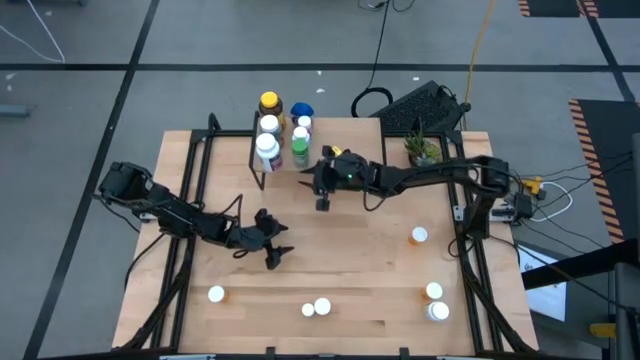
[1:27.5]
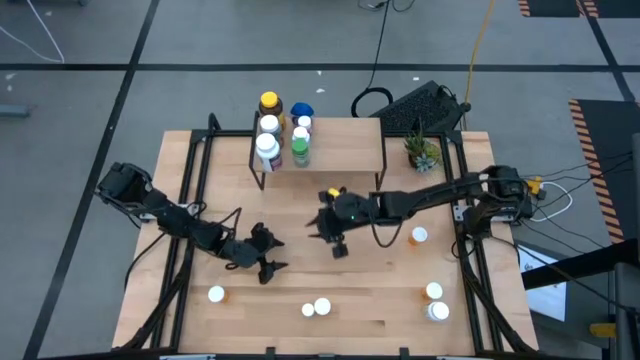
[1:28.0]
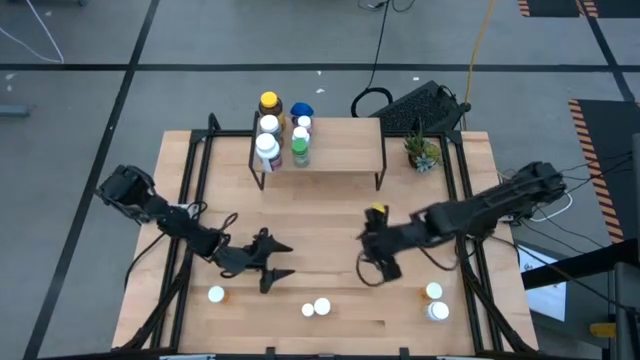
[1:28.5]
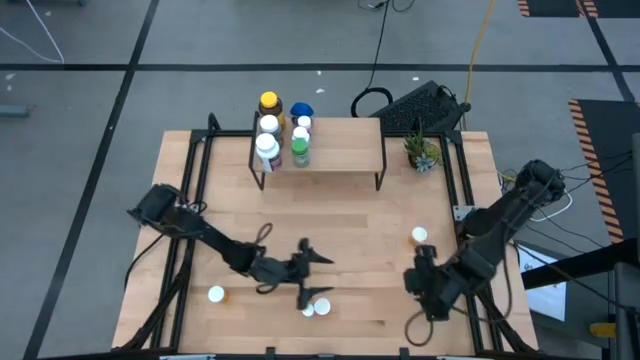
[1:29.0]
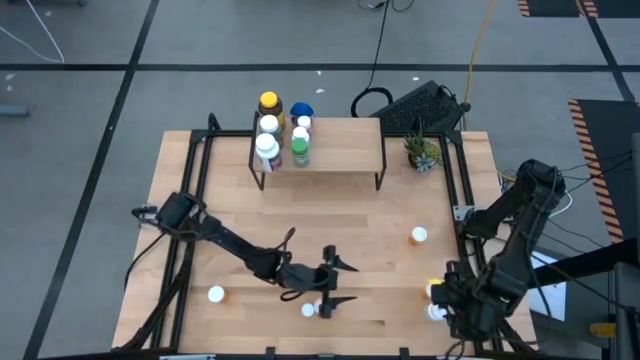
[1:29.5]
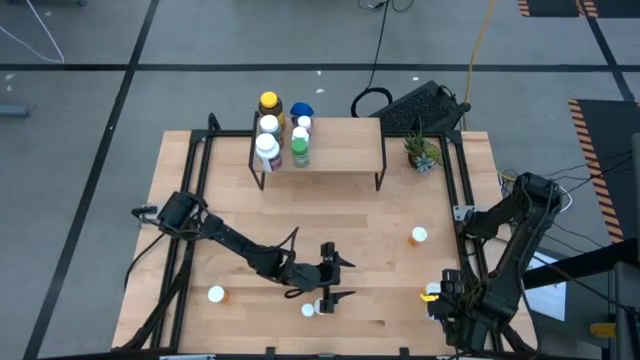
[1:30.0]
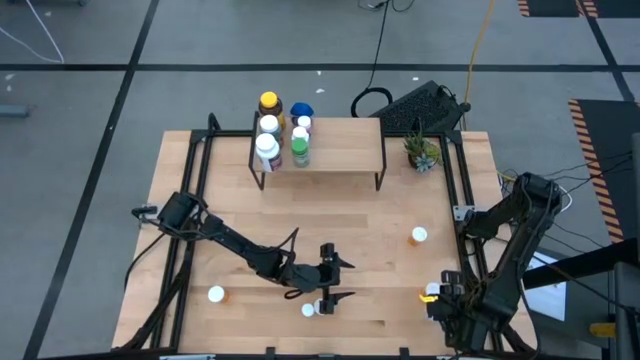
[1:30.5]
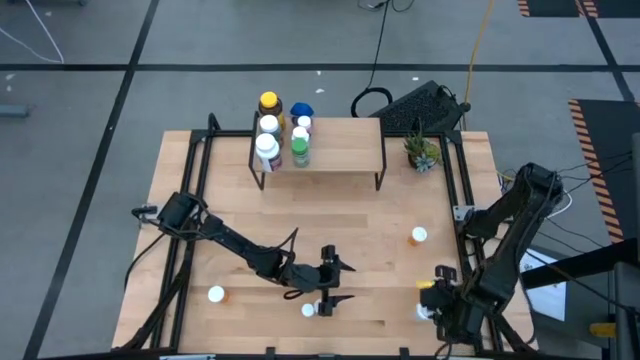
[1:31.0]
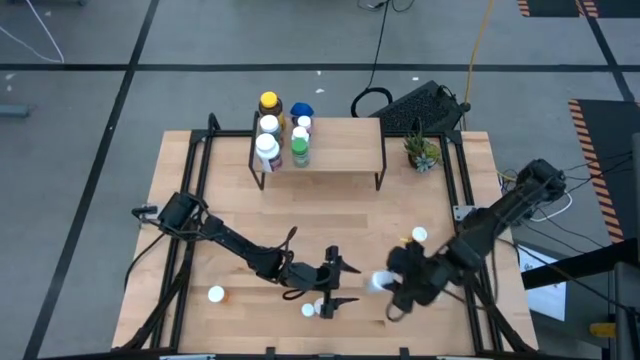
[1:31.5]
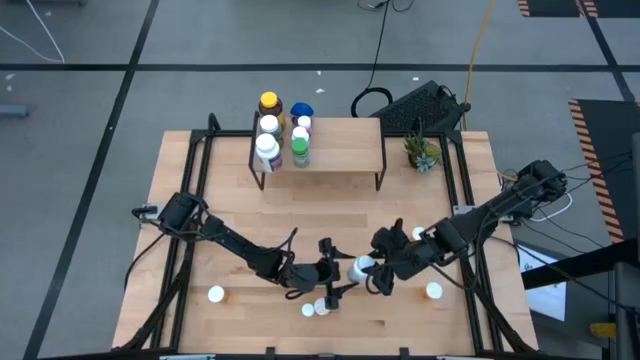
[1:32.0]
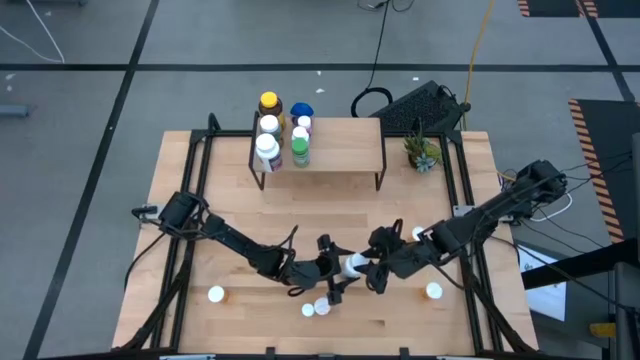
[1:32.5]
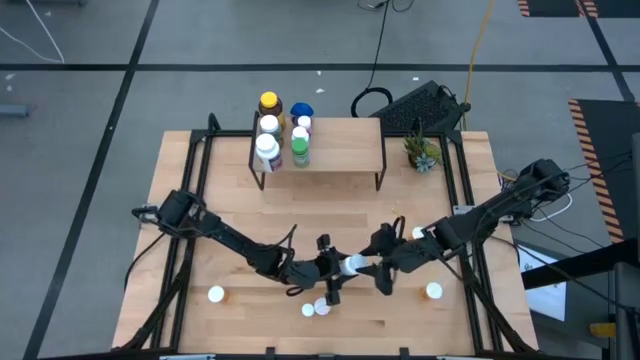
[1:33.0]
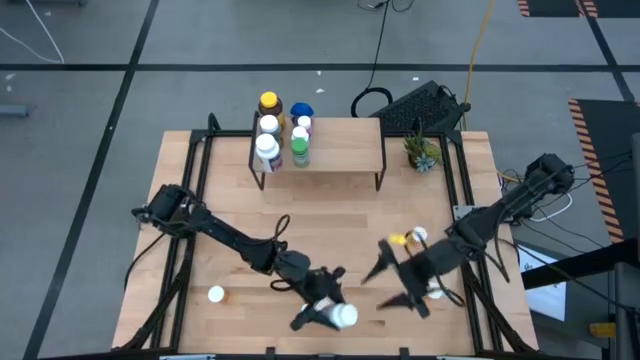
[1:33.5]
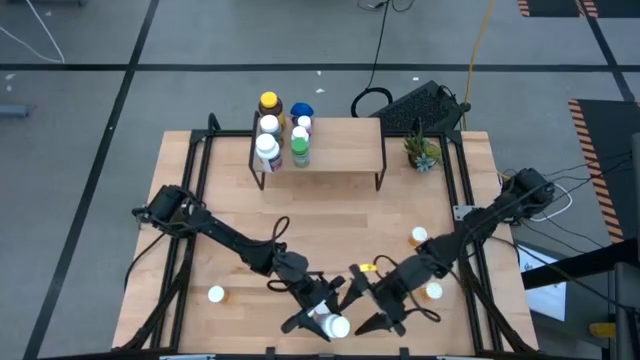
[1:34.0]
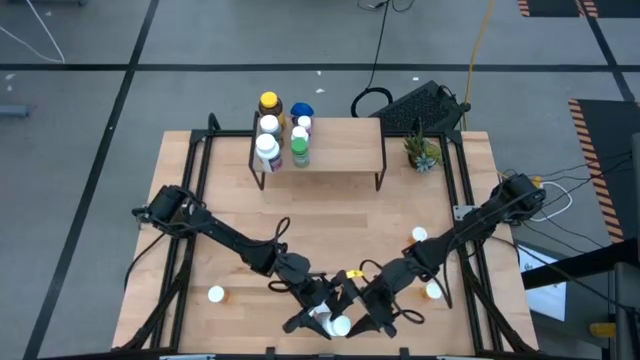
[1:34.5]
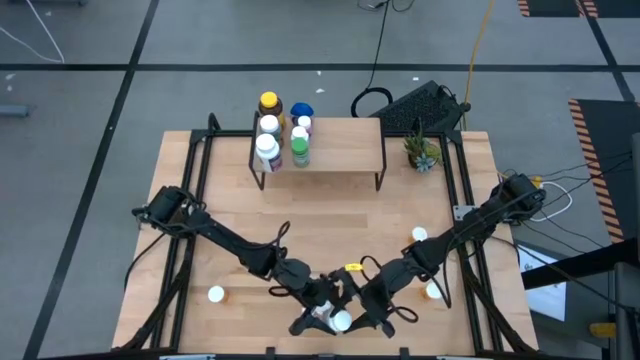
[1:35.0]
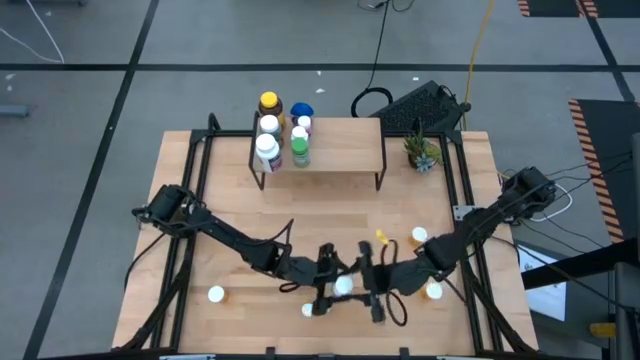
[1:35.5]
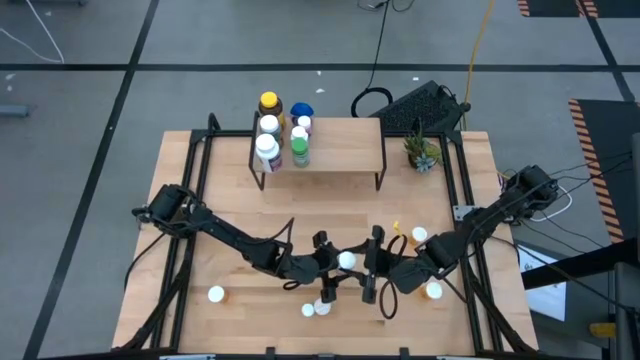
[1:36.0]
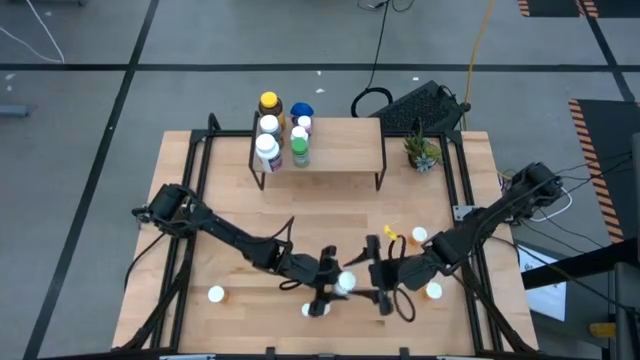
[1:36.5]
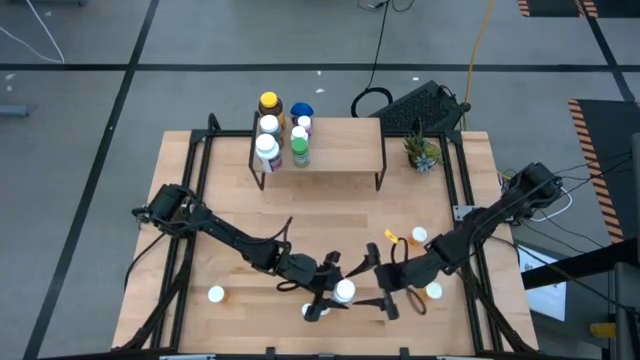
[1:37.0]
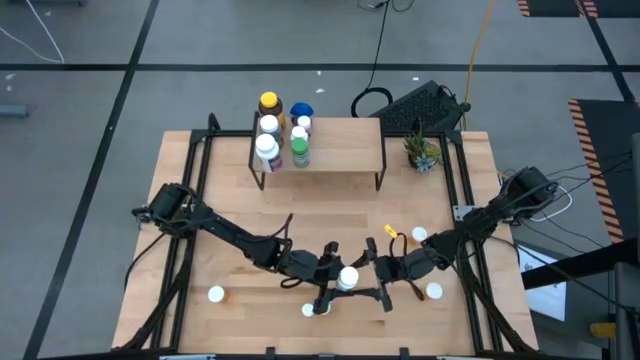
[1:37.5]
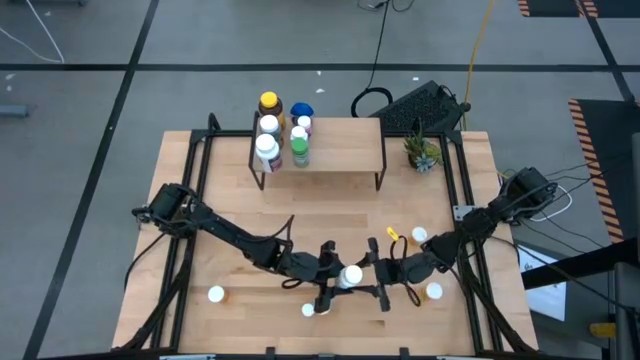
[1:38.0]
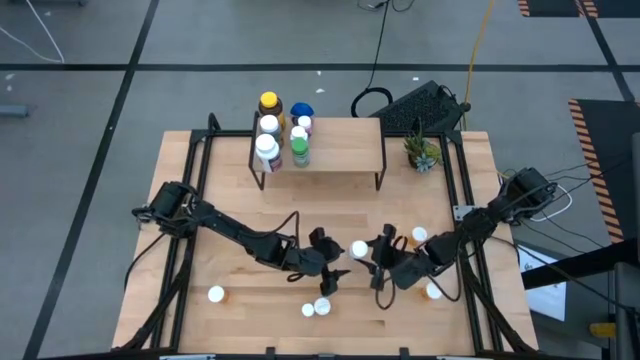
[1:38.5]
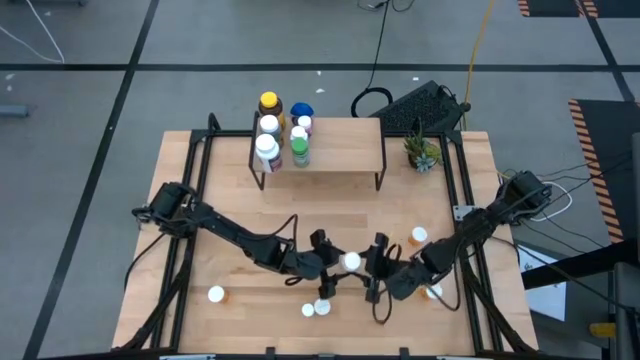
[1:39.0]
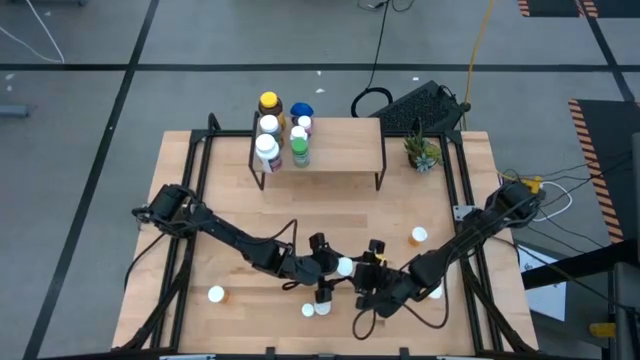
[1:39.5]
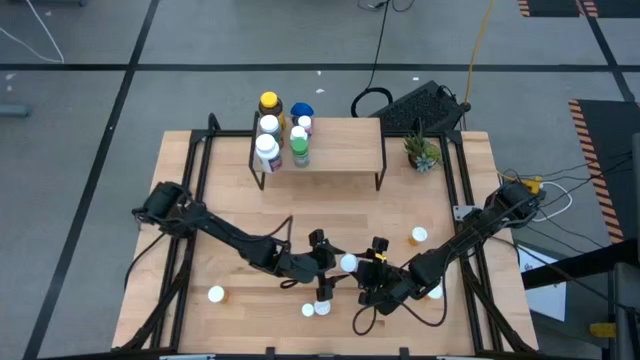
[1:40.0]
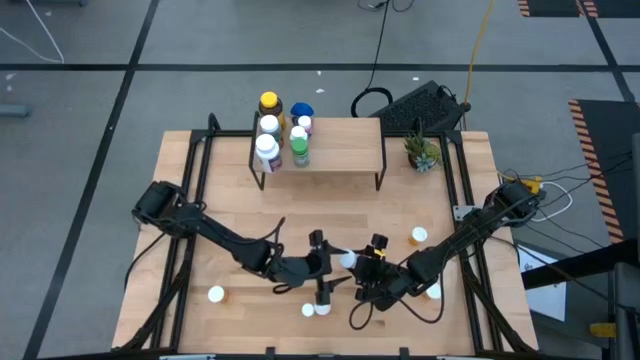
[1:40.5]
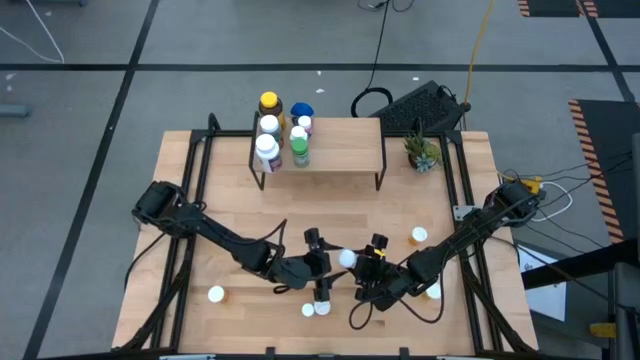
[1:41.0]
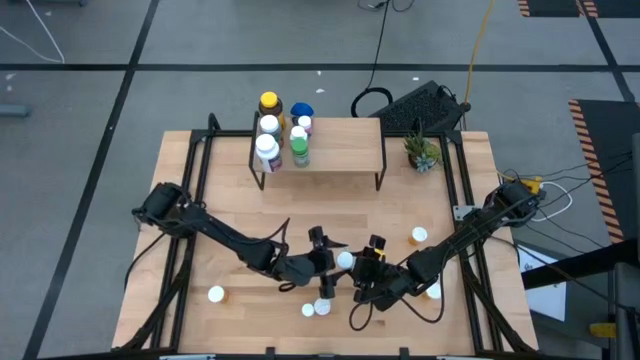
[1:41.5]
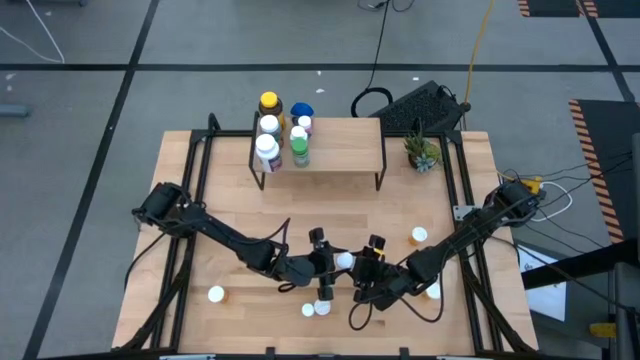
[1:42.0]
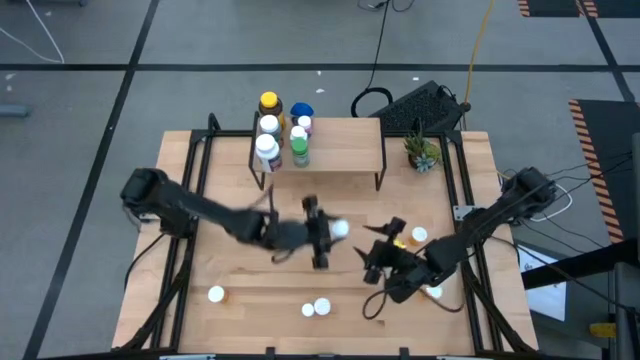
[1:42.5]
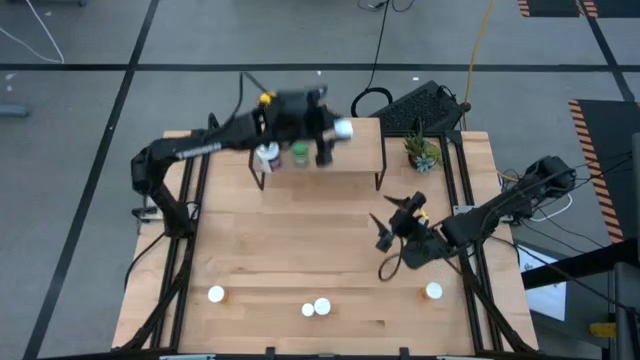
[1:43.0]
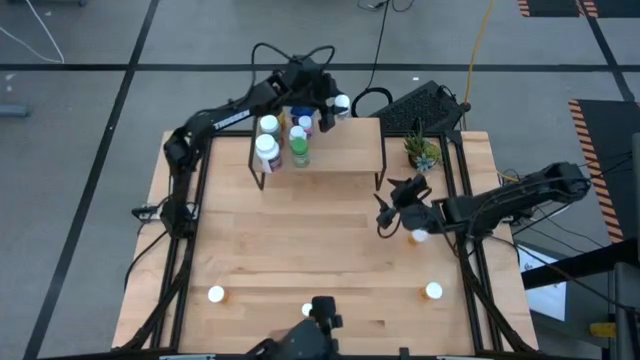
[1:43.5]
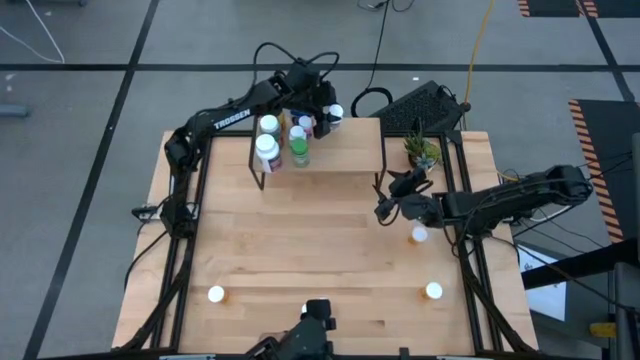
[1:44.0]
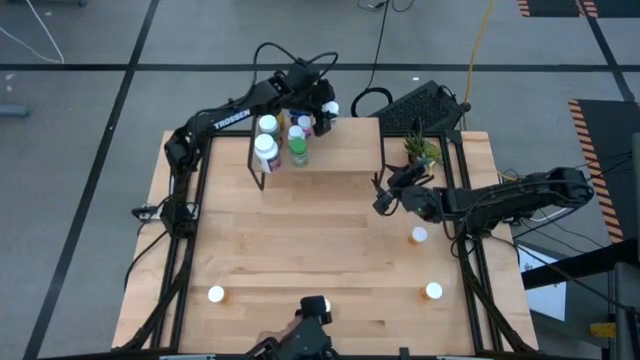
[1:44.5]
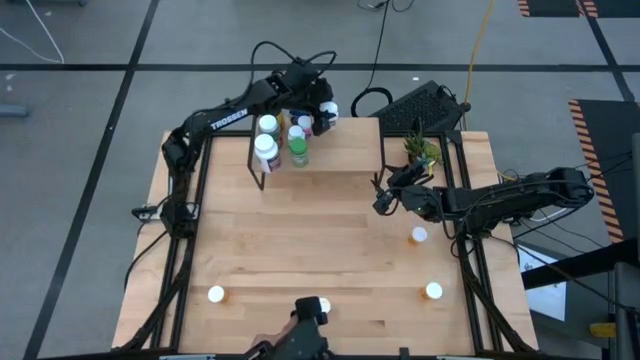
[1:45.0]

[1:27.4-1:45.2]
Task: Pick and place medicine bottles onto shelf by color
Put the right small white medicine bottle on the shelf

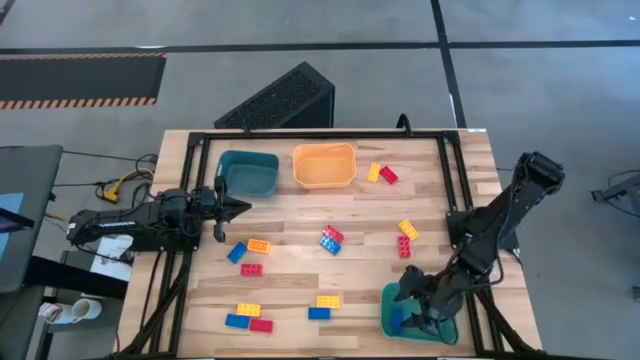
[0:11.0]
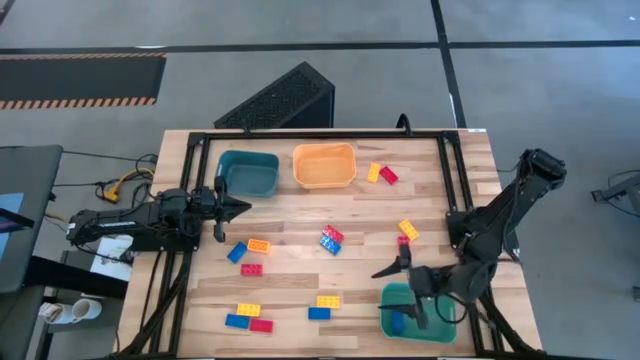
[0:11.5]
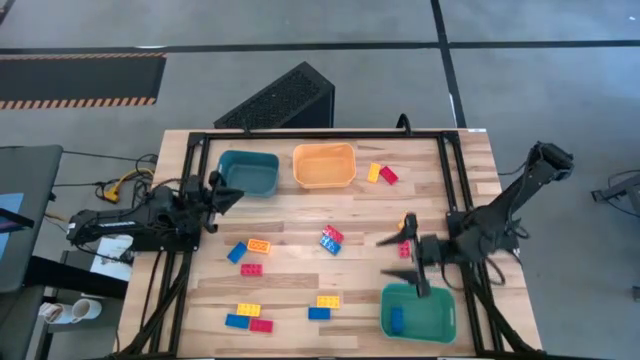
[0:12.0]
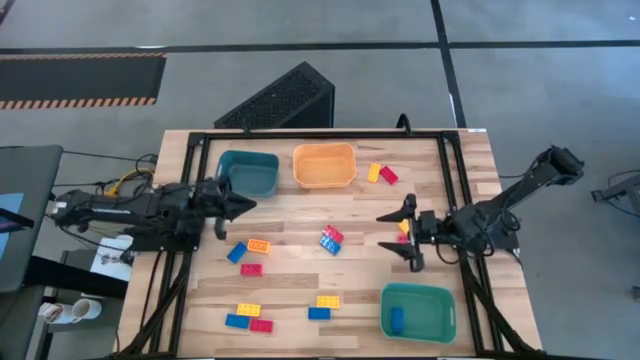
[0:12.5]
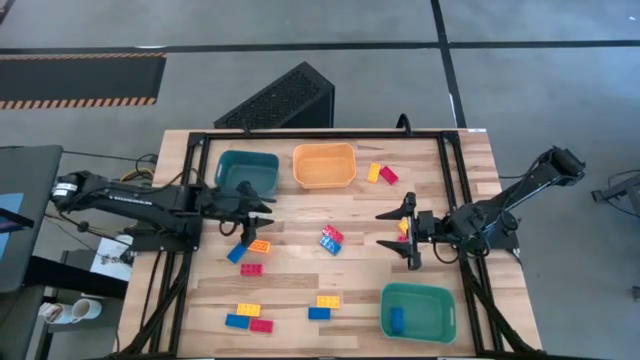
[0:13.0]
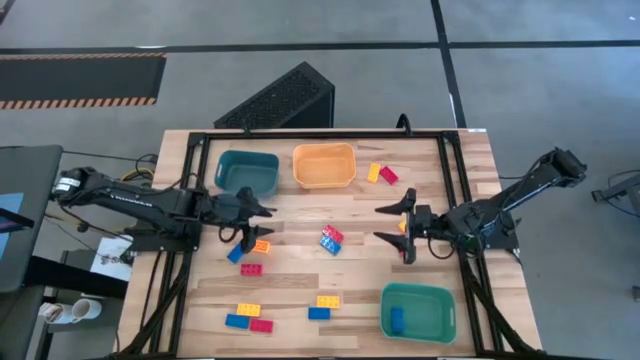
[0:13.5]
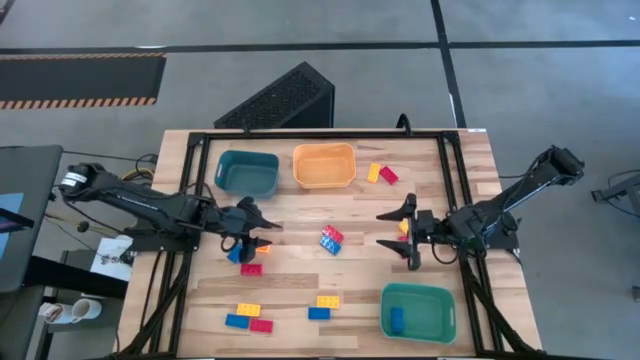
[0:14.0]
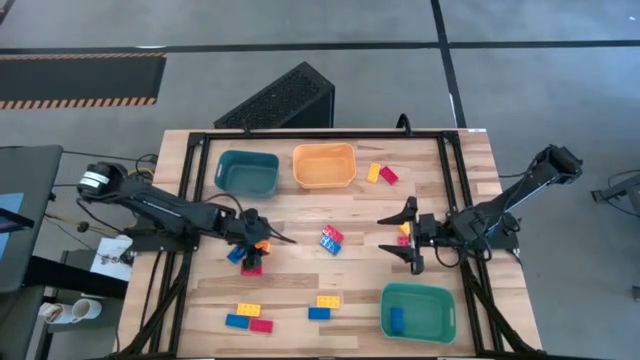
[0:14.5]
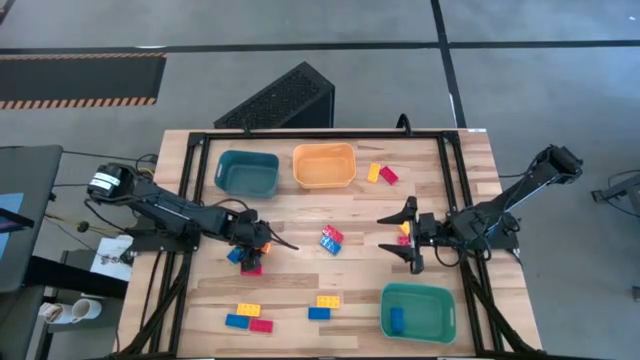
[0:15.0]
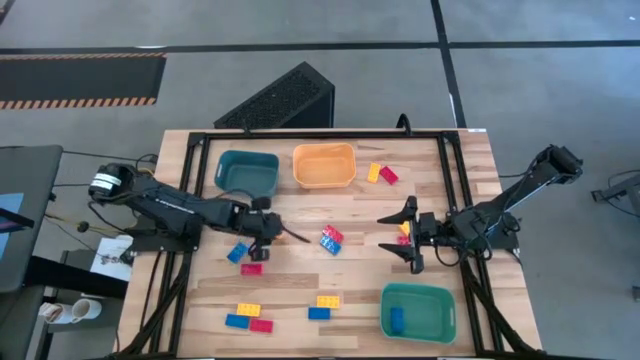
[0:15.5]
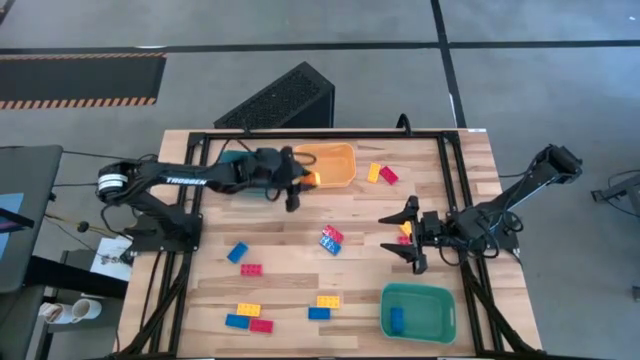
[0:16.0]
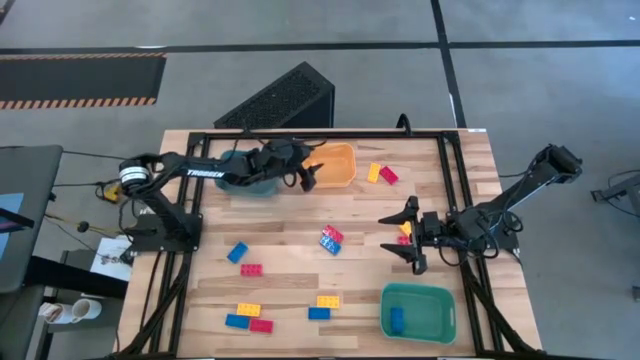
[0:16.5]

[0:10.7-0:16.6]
Task: Sort & place blocks by color
Put the yellow game piece into the yellow bin
